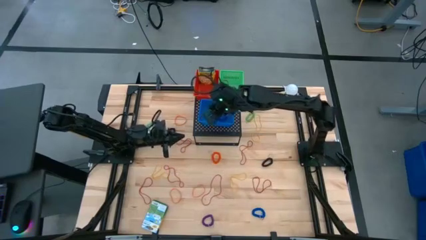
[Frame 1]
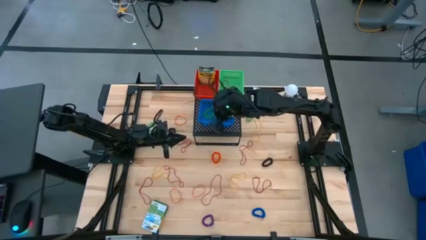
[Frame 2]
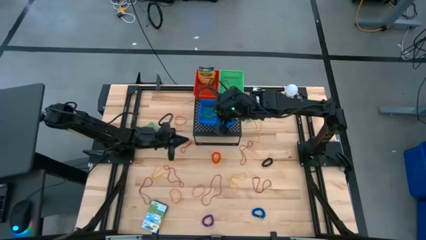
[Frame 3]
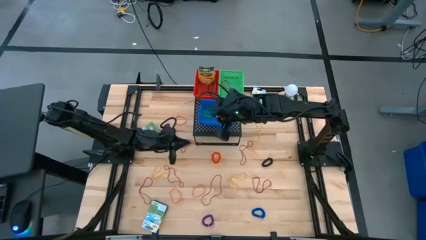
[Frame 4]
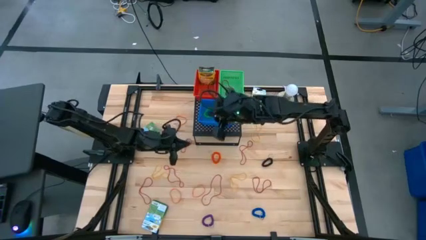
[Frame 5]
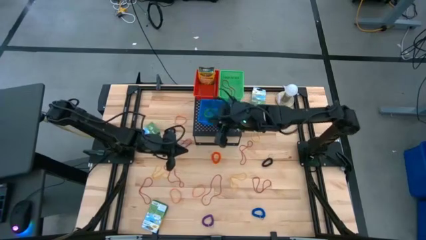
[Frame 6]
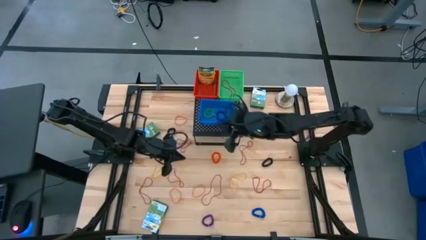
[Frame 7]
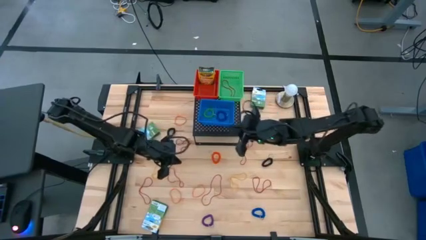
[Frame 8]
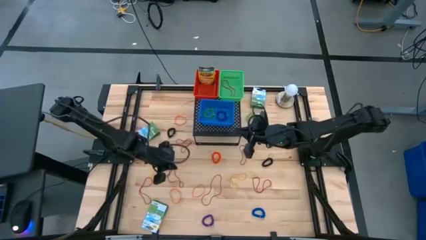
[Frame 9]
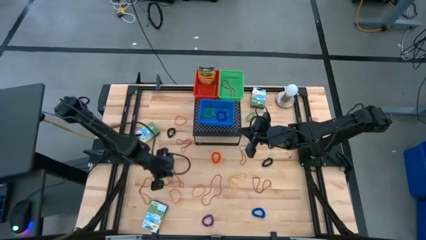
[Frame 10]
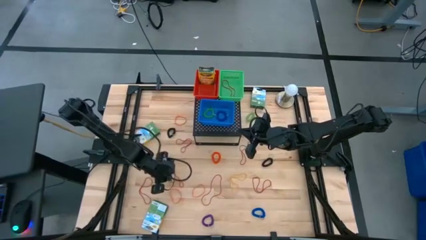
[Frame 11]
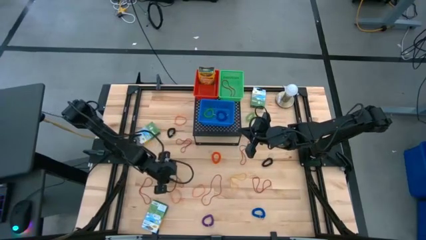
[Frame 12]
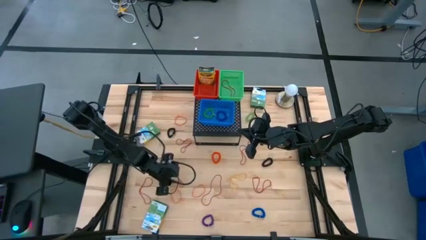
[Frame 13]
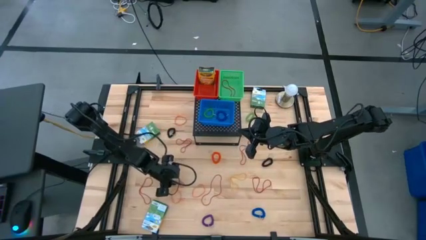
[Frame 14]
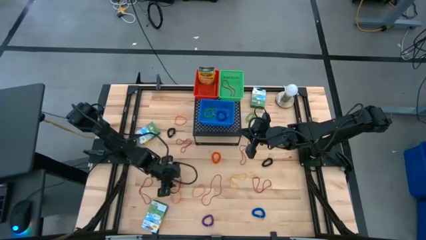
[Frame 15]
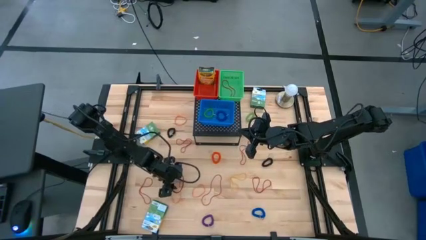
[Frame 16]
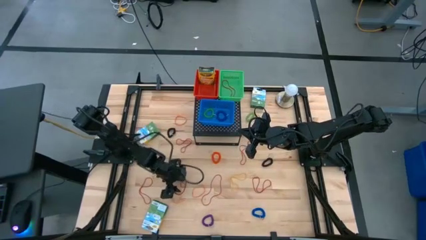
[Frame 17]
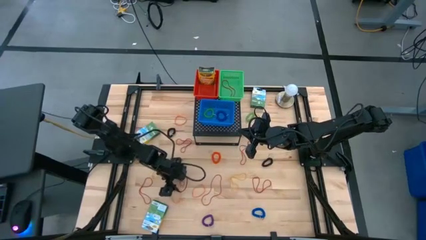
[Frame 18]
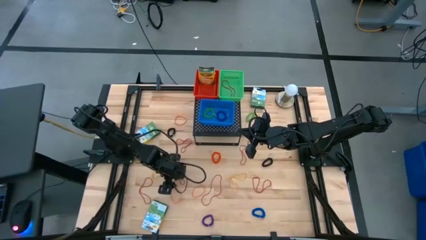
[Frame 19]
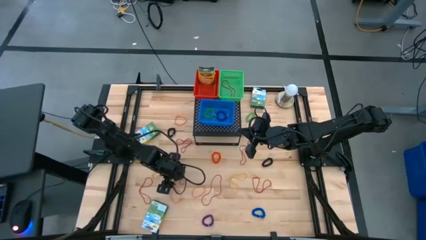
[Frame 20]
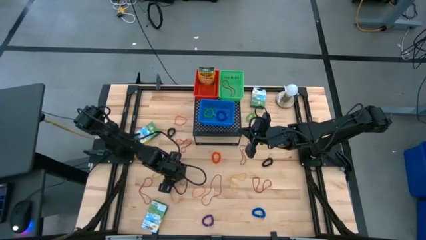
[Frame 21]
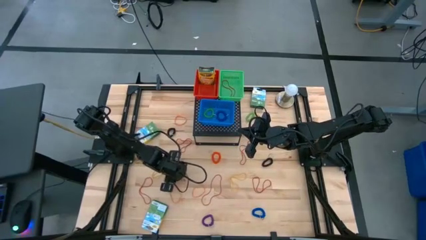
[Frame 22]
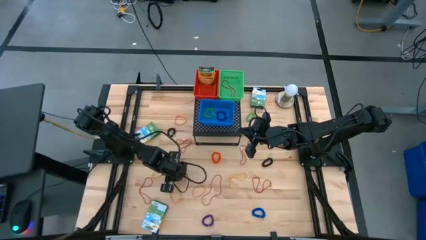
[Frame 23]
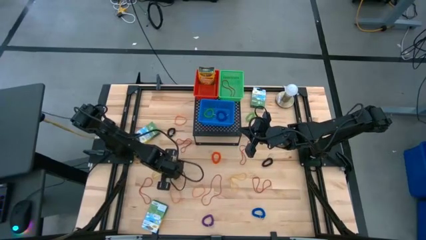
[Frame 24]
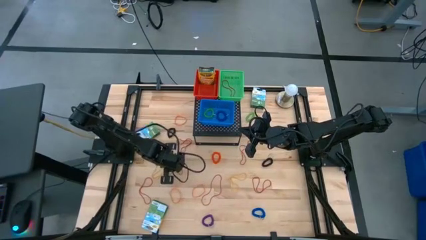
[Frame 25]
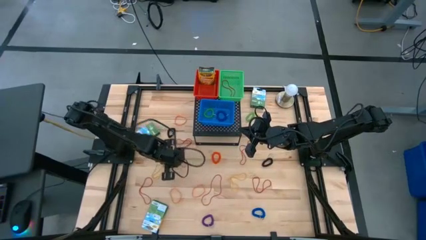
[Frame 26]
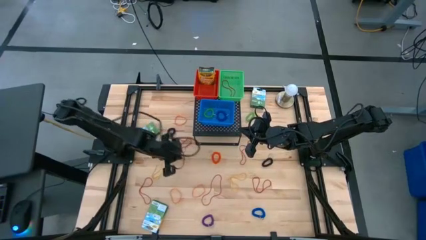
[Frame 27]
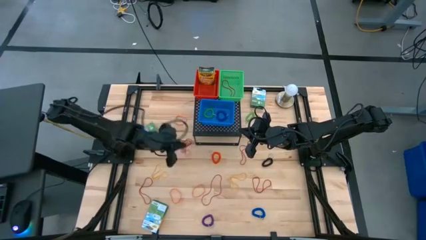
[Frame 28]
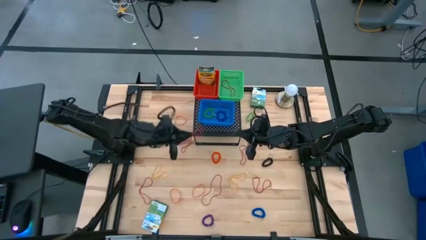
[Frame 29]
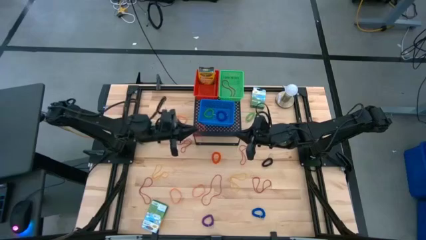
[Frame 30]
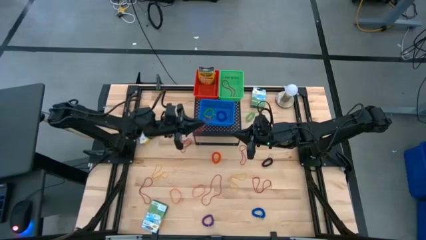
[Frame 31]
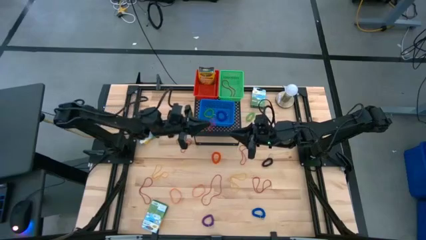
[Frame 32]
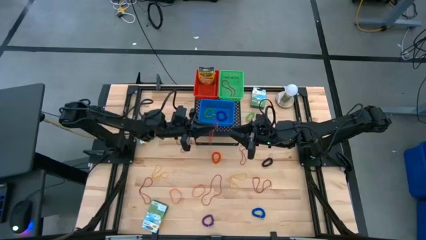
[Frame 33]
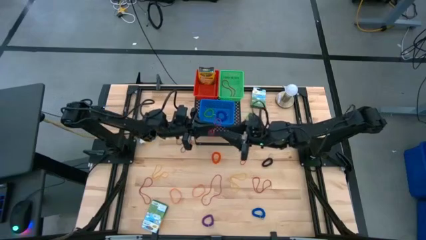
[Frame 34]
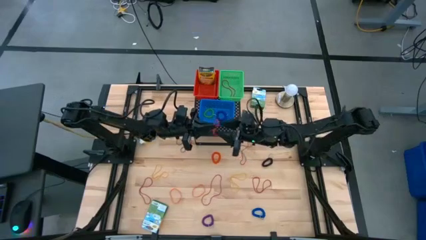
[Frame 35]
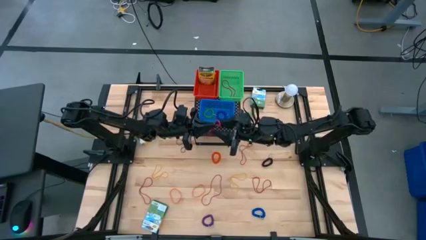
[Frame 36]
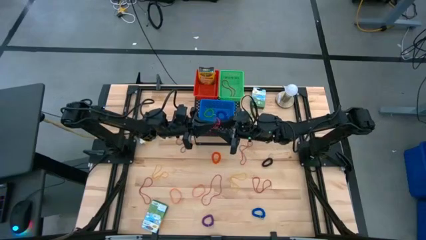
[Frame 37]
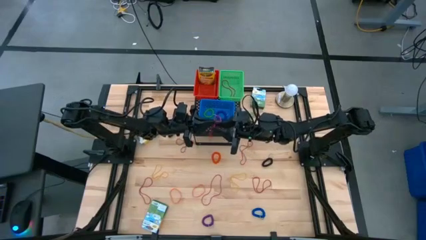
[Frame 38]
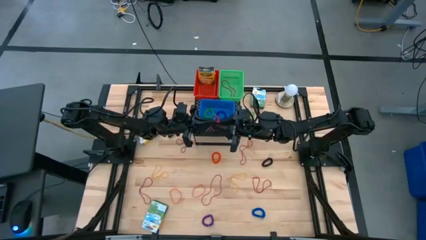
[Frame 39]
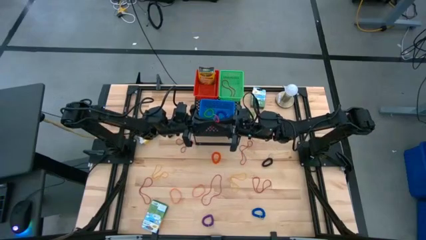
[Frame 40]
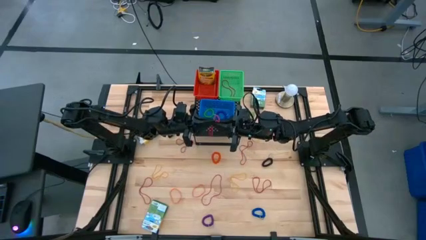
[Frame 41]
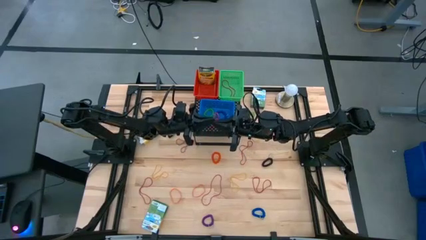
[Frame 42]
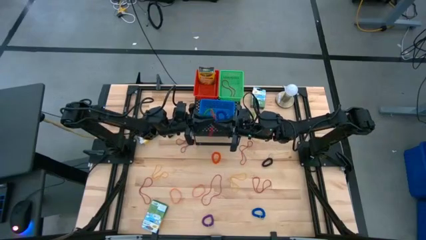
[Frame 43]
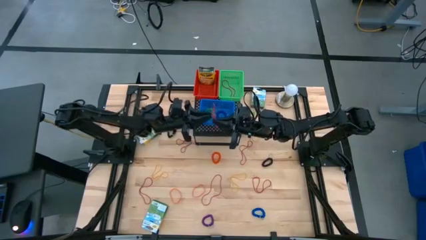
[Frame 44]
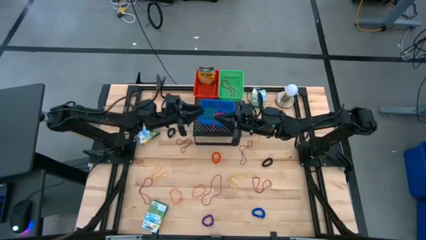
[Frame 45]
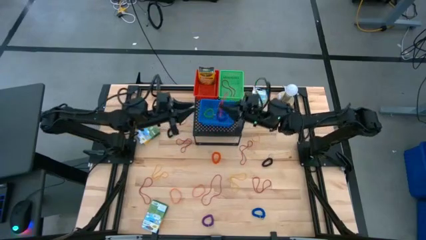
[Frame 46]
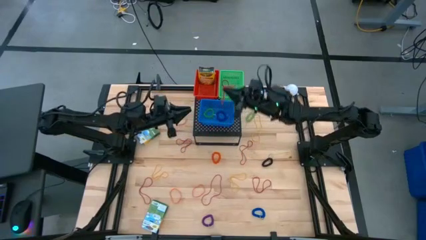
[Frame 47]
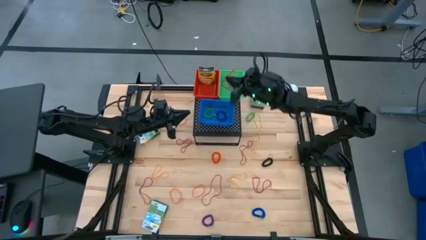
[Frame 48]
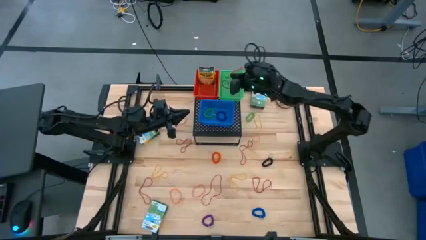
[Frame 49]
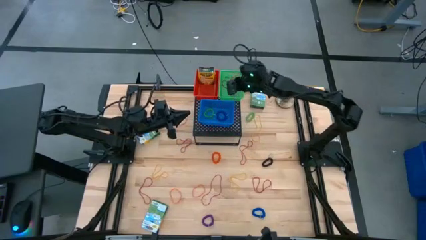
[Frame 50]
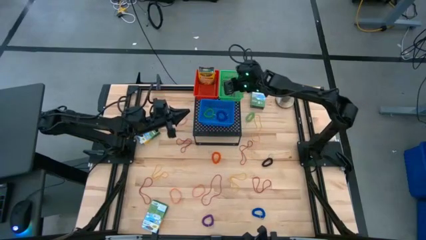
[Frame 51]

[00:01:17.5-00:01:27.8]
Task: Pick & Place Office Desk Supplies
Put the red rubber band into the green bin on the shelf

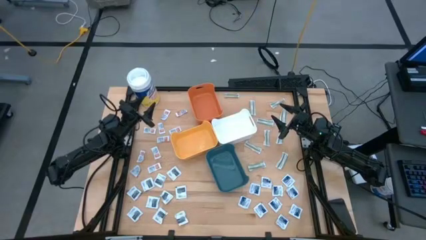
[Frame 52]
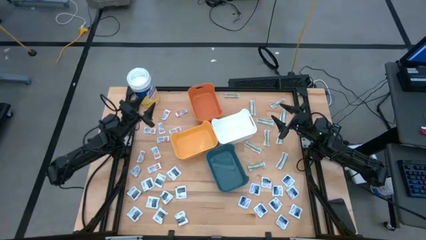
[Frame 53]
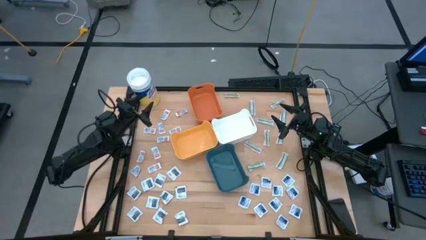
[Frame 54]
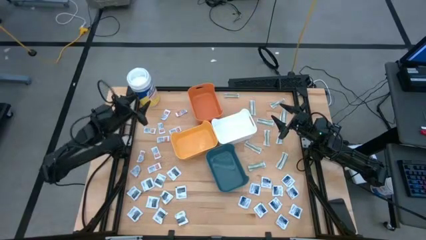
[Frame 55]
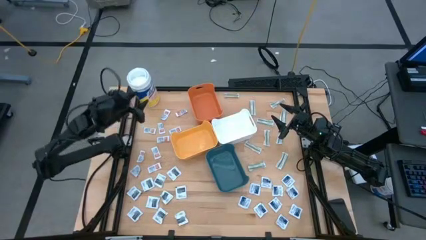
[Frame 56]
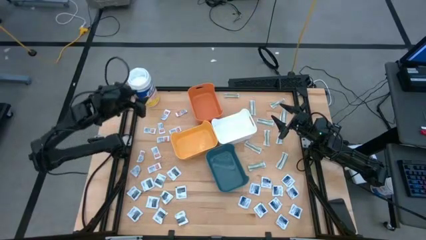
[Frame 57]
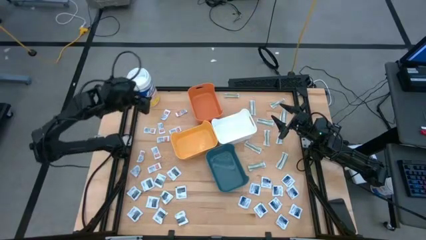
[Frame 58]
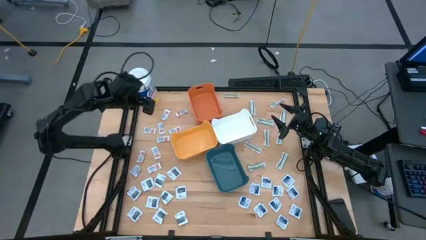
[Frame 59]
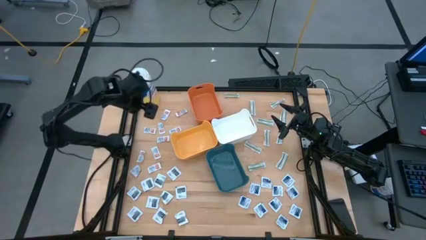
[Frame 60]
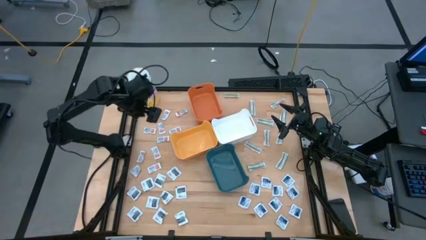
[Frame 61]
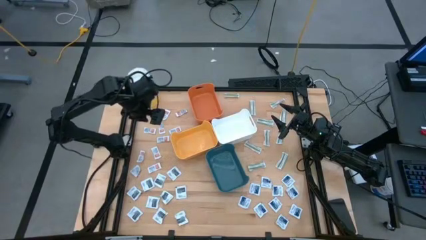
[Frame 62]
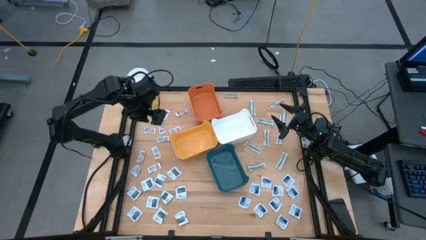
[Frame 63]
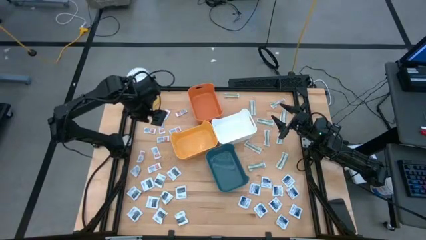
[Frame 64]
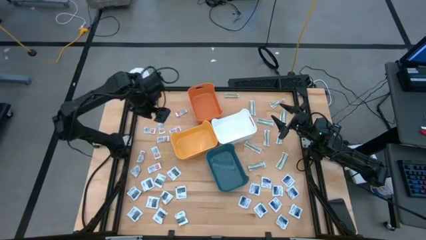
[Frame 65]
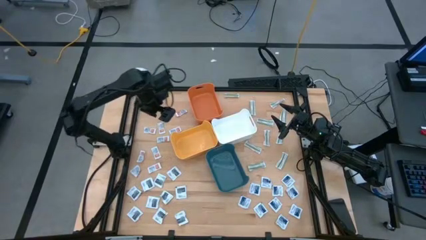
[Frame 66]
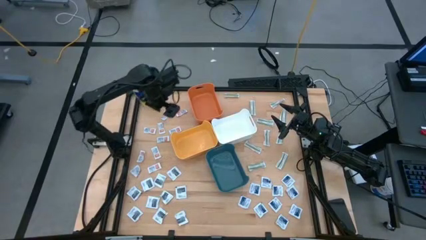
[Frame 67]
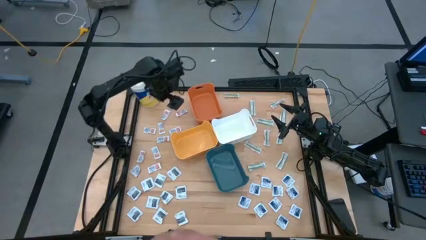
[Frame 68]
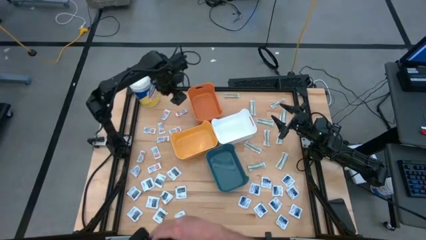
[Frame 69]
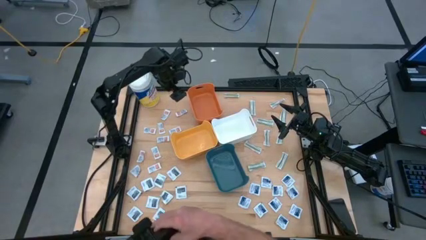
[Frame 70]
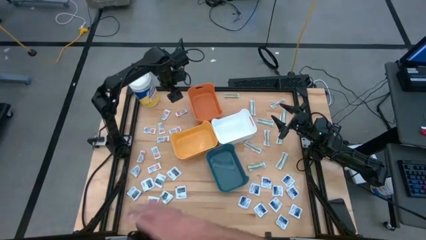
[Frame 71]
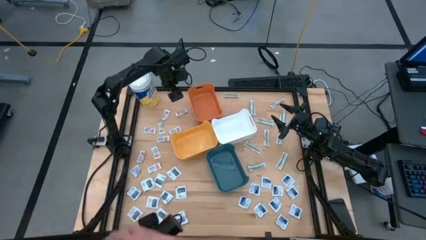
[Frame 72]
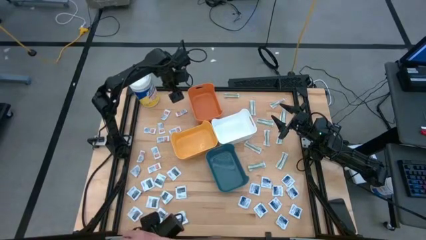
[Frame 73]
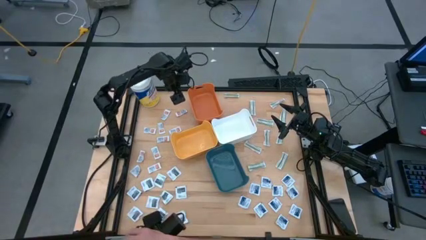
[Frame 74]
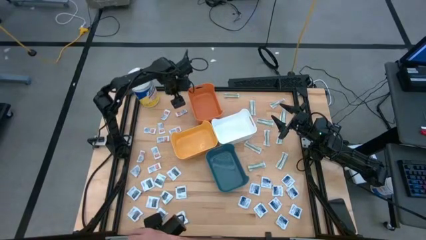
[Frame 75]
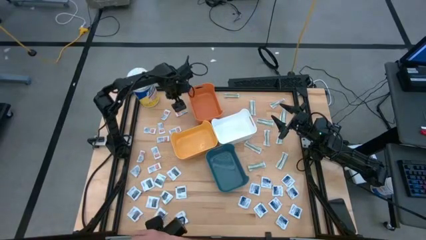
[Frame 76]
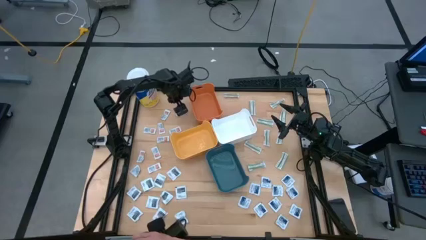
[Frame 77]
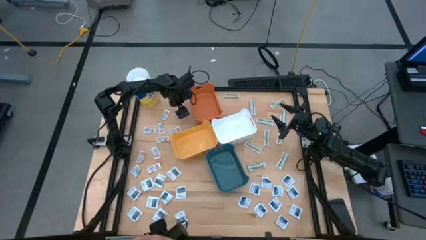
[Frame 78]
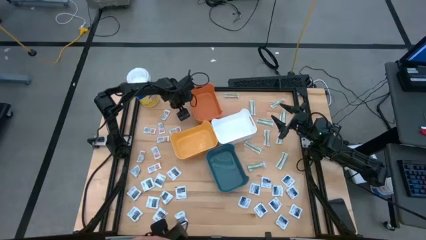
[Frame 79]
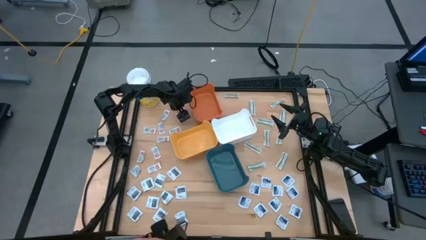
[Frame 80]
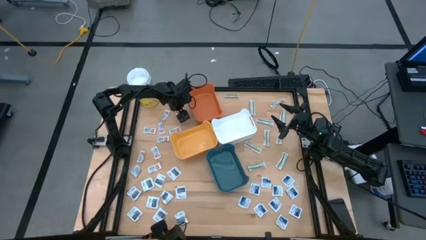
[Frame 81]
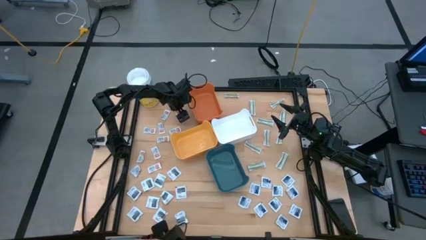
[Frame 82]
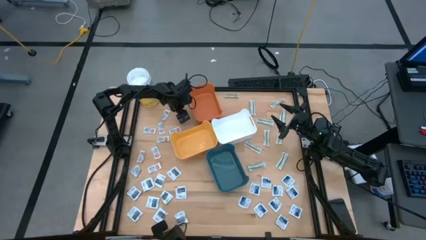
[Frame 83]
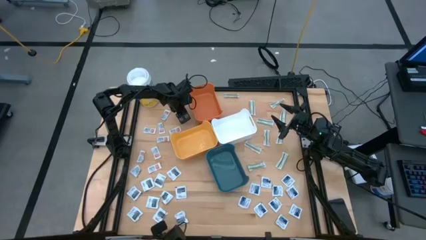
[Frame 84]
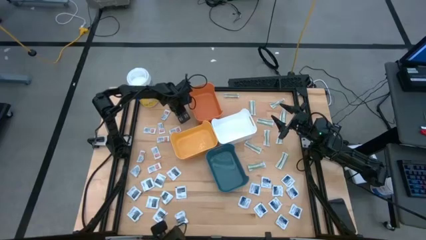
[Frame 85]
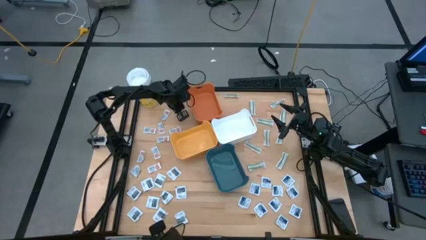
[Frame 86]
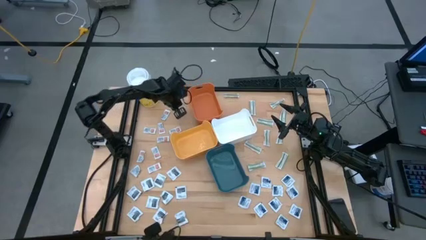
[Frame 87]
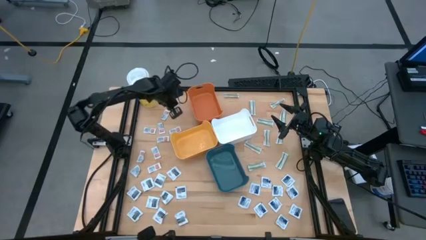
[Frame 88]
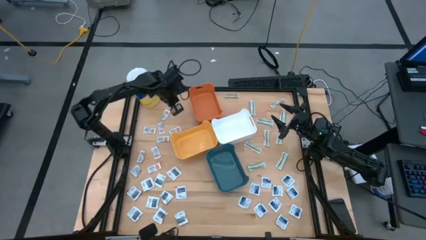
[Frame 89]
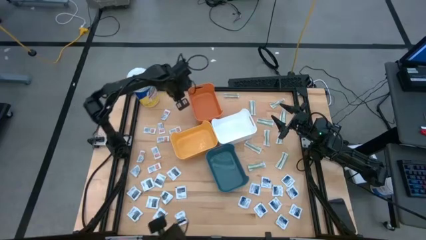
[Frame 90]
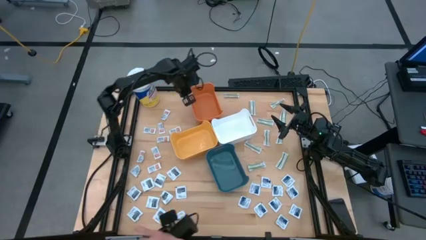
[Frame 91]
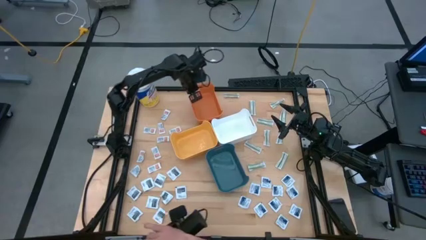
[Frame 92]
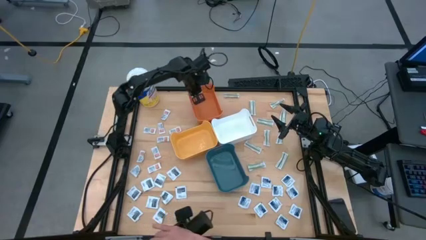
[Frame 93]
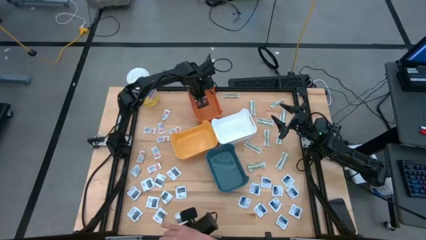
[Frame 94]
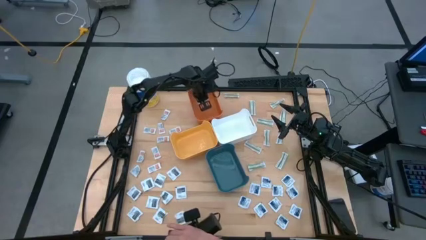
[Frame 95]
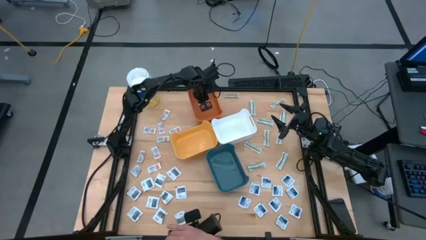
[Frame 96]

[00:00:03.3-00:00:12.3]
Task: Pick & Place First Aid Supplies
Put the orange ointment pack into the orange bin
